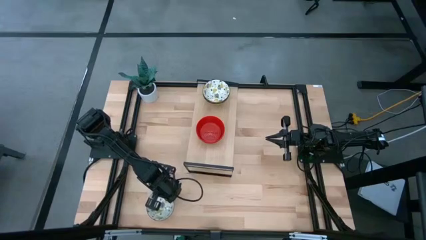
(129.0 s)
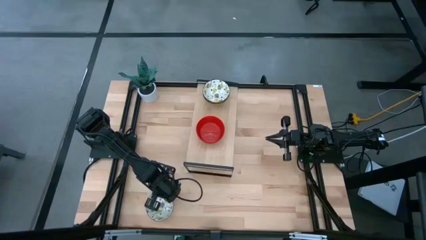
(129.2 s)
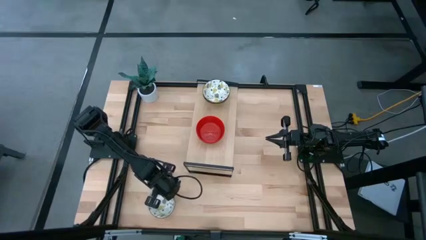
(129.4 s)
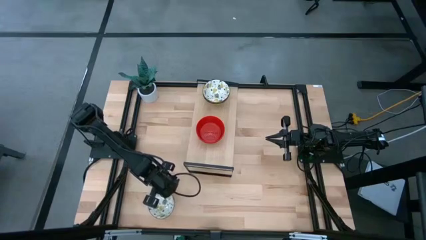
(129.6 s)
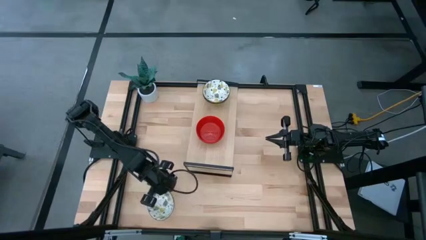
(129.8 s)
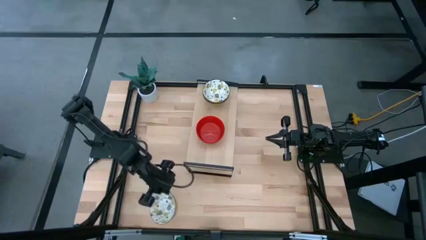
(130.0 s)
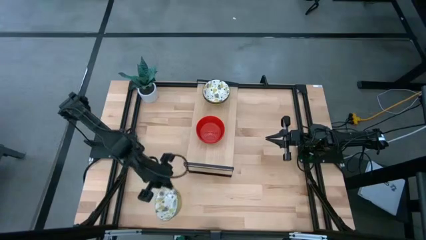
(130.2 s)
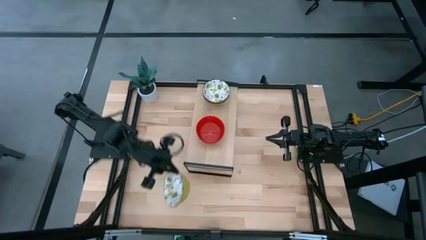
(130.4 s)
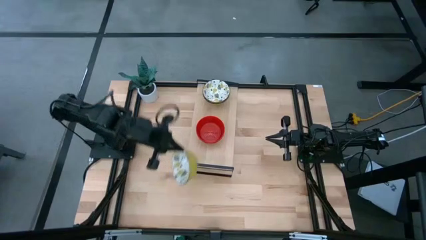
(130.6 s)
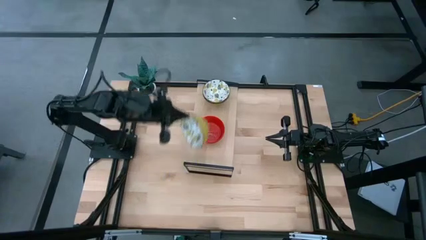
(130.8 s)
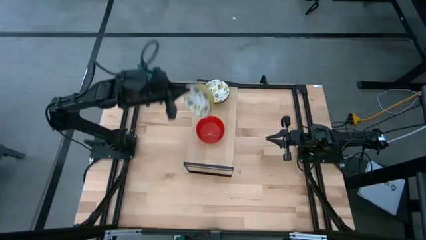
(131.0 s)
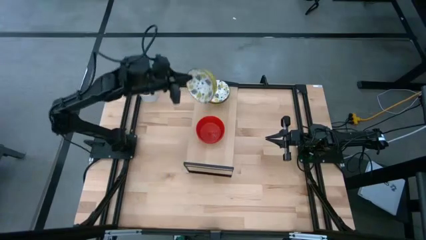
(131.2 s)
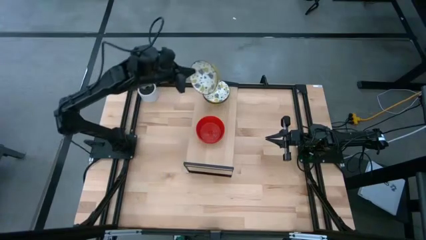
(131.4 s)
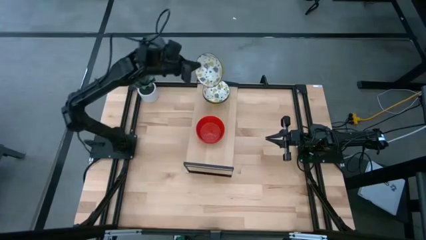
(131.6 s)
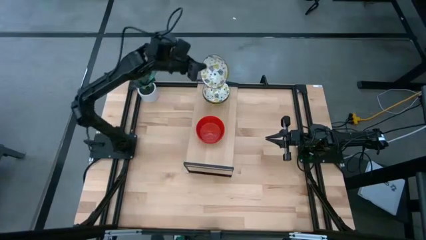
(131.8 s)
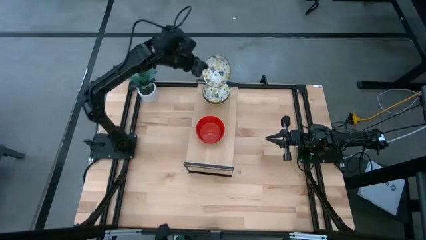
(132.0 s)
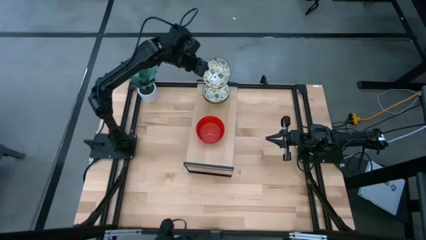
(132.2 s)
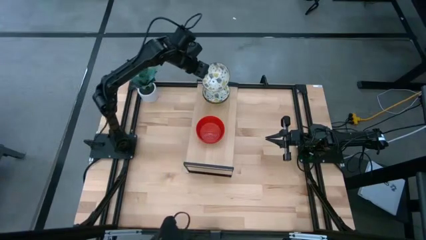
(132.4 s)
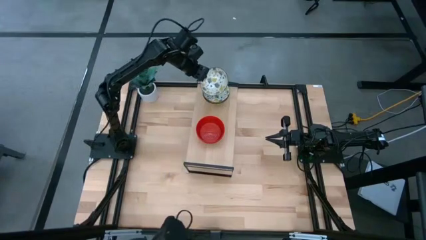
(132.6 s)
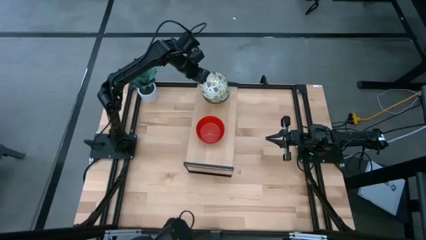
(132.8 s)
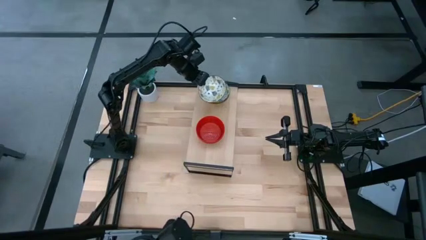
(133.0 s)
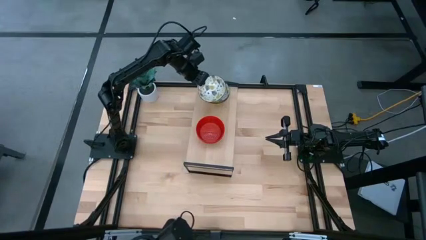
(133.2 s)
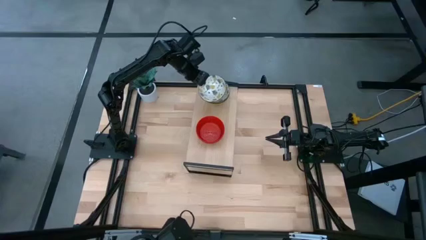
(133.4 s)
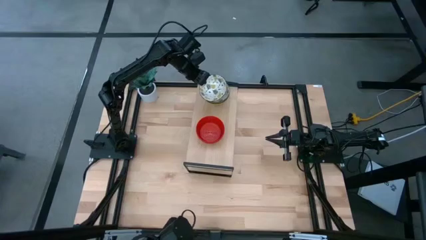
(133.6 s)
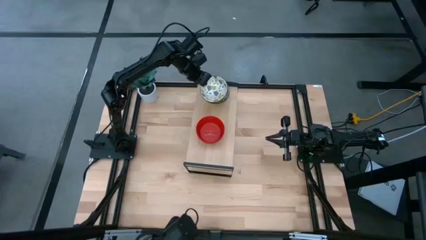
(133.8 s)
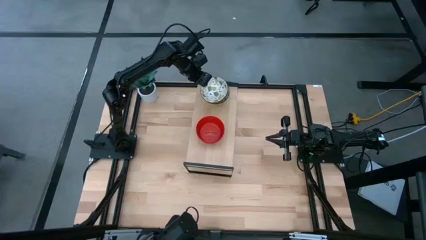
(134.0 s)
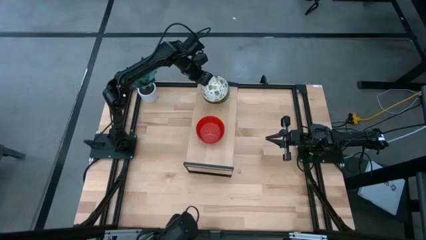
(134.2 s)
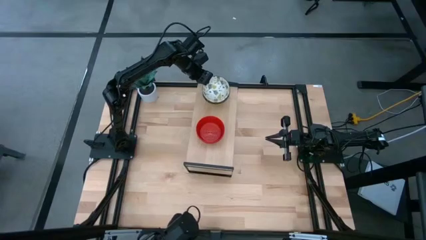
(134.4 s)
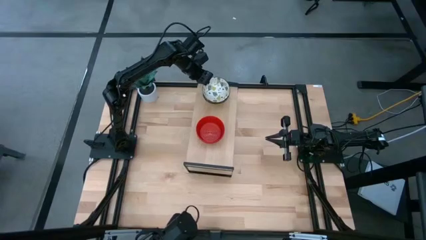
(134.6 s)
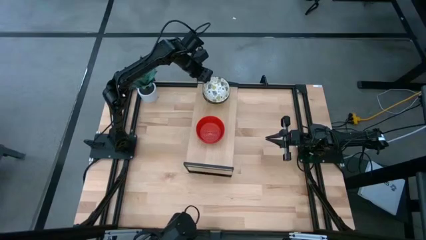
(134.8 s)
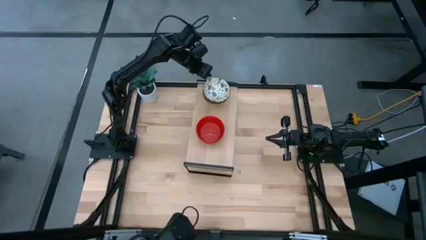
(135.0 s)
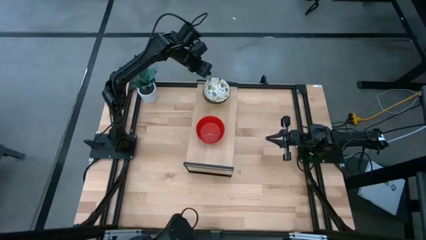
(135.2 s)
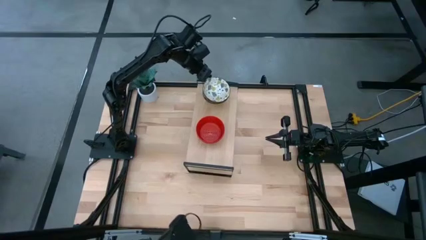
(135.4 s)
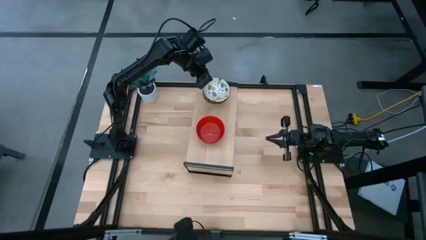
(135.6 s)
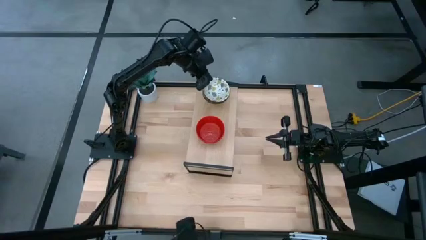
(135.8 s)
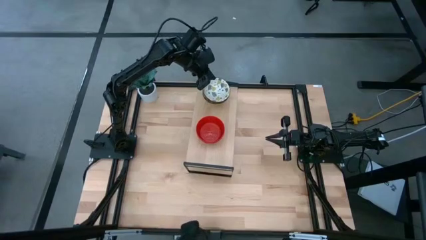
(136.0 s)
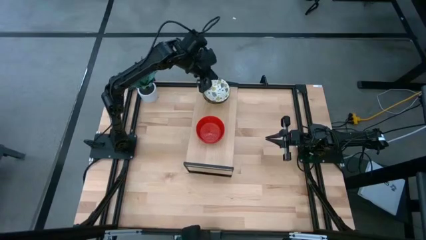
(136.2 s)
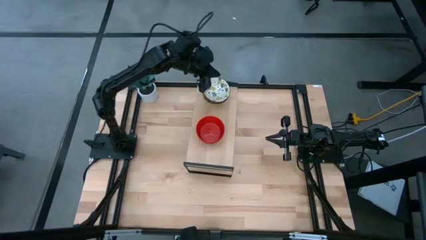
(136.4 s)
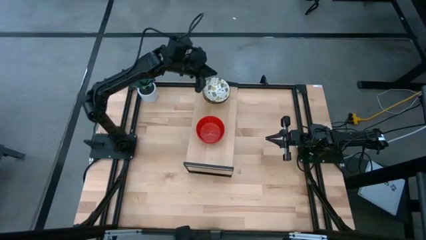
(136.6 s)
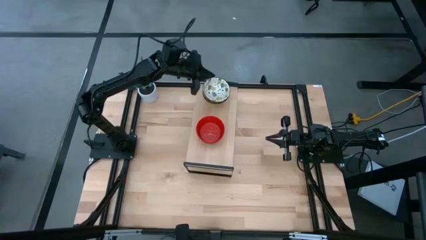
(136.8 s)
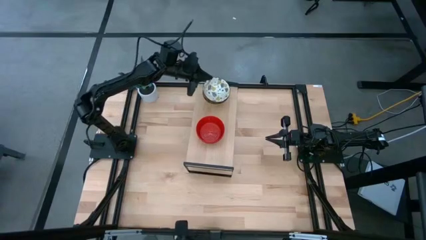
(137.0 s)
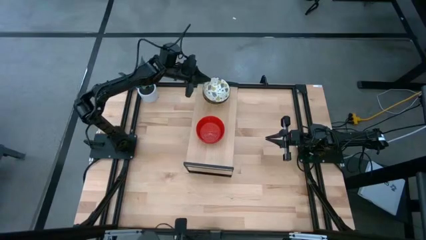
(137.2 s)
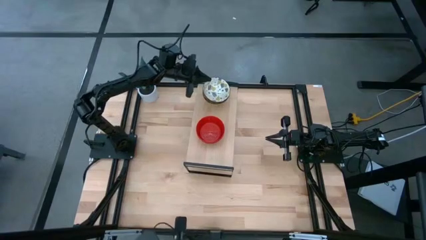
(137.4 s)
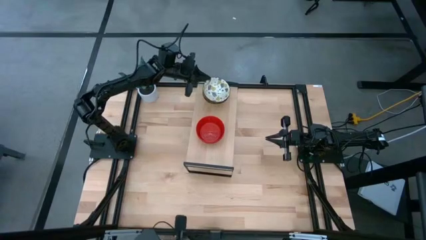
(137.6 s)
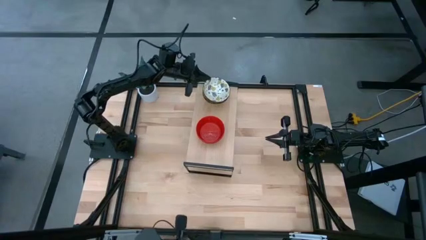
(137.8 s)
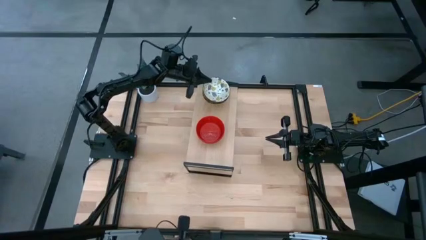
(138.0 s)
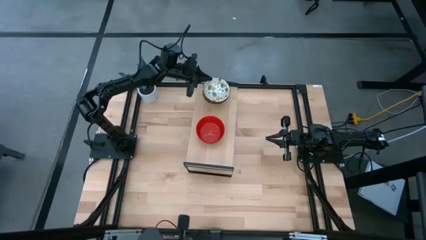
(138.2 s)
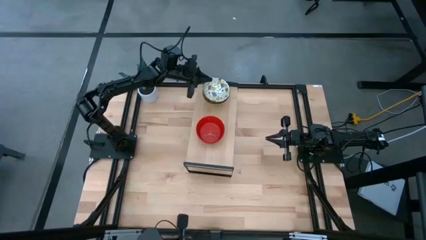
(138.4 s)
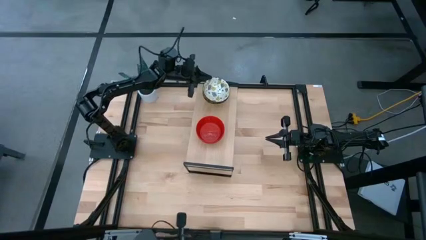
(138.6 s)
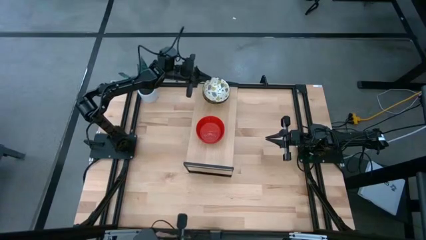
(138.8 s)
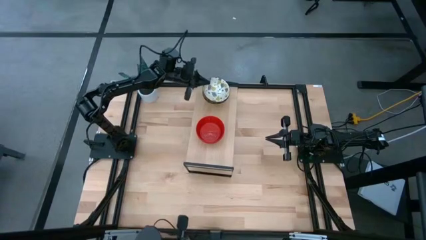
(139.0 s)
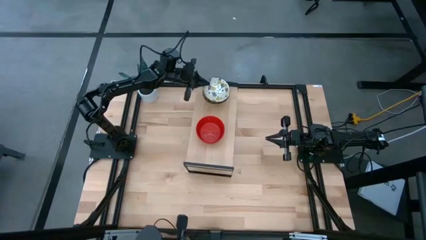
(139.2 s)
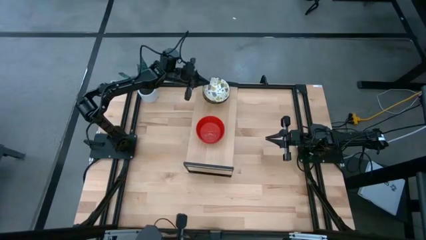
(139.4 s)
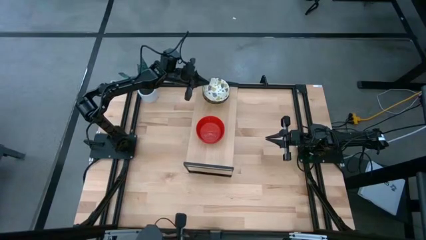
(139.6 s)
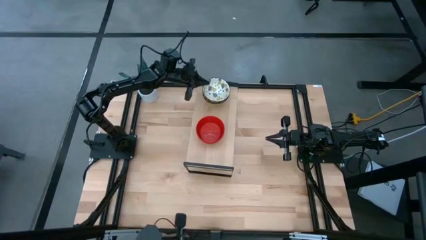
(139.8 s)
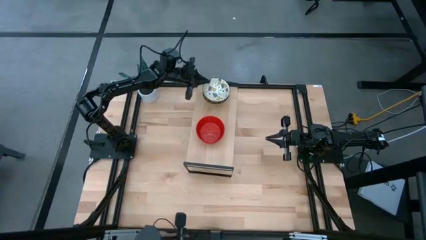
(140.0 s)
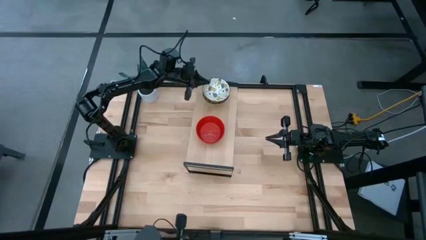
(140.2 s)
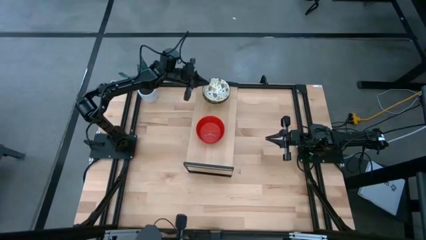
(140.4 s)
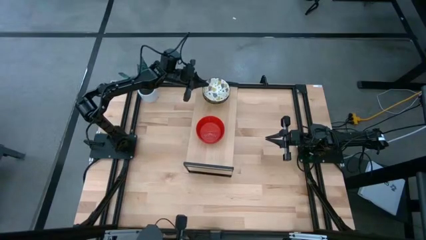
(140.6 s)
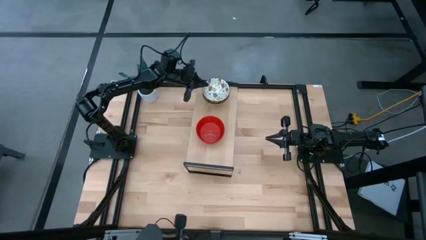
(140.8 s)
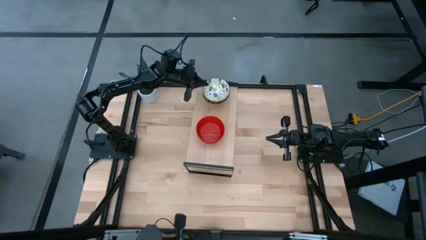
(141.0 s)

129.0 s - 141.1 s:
Task: Pick & Place Mini bowls
Stack the white patterned bowl on top of the white patterned bowl on the shelf

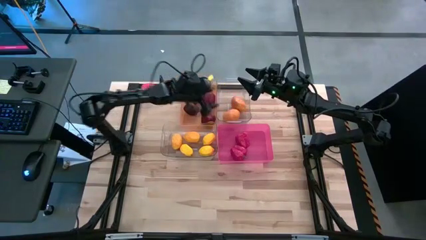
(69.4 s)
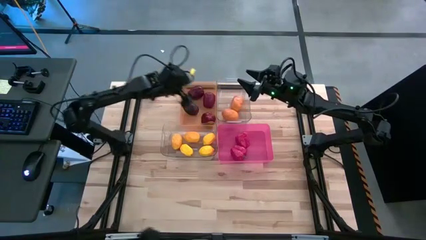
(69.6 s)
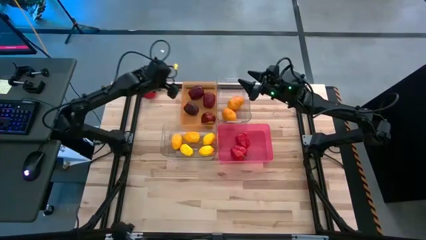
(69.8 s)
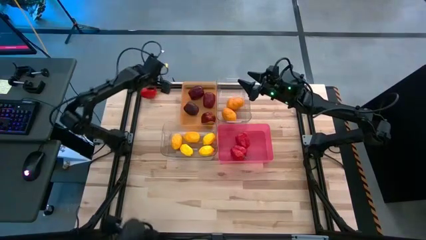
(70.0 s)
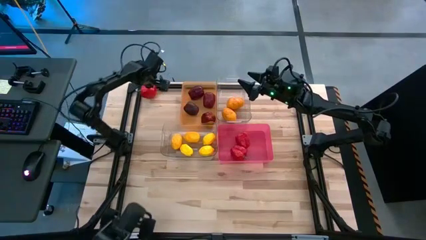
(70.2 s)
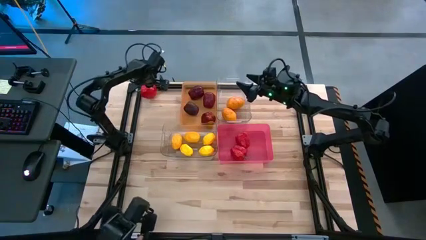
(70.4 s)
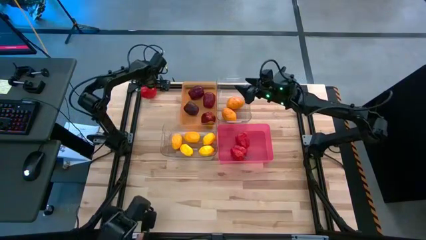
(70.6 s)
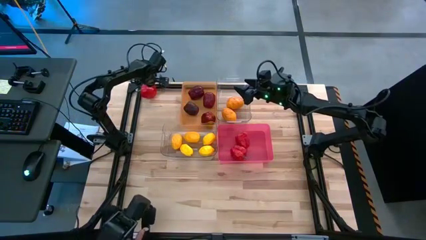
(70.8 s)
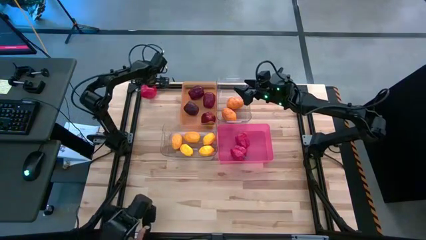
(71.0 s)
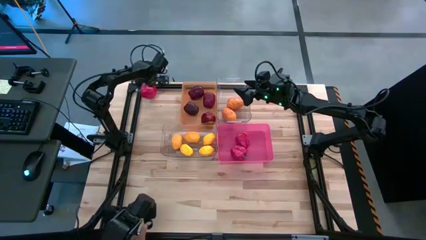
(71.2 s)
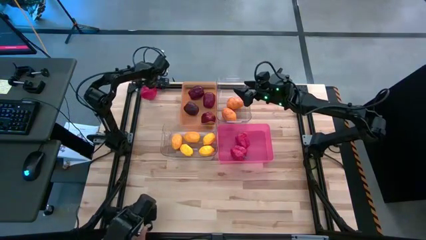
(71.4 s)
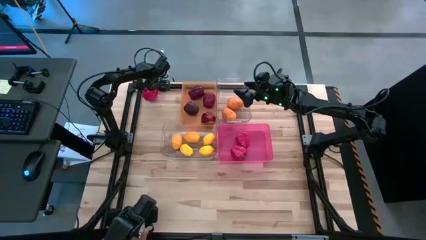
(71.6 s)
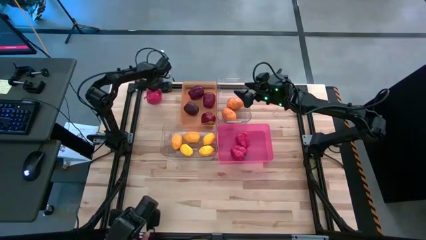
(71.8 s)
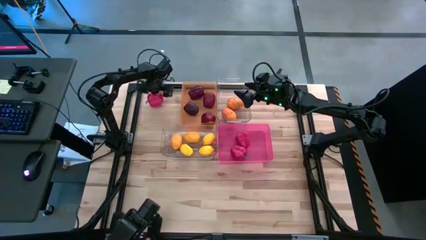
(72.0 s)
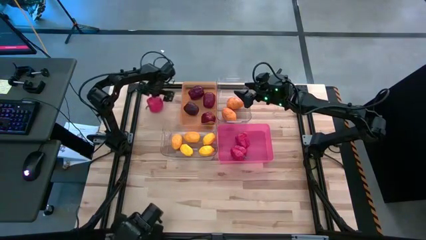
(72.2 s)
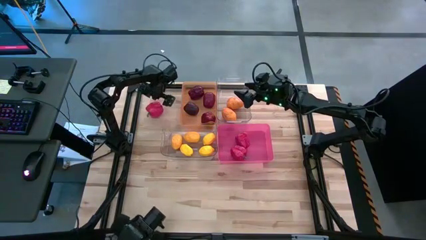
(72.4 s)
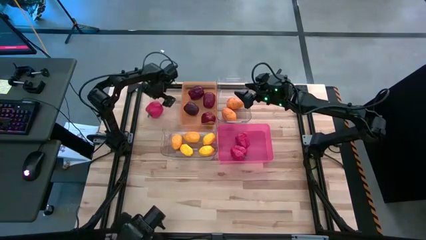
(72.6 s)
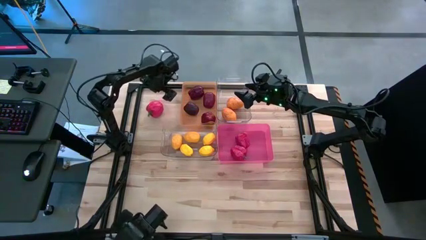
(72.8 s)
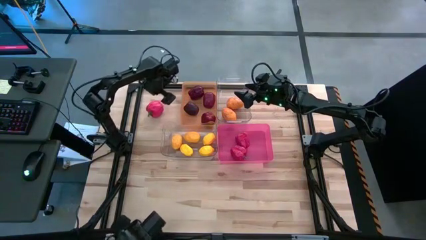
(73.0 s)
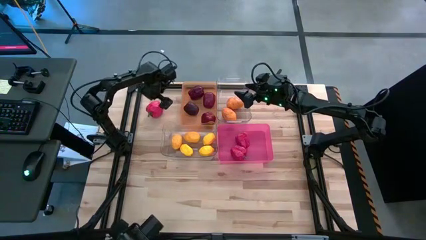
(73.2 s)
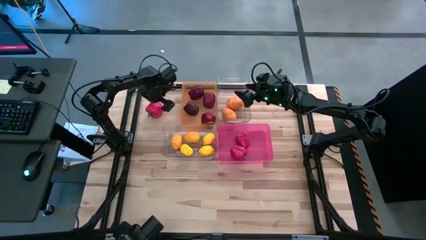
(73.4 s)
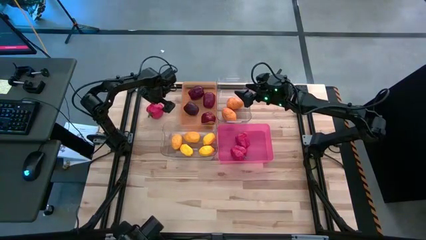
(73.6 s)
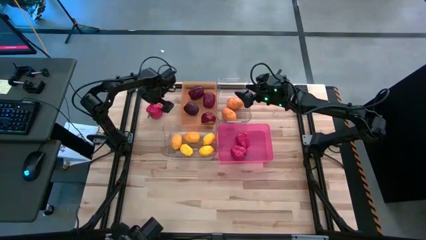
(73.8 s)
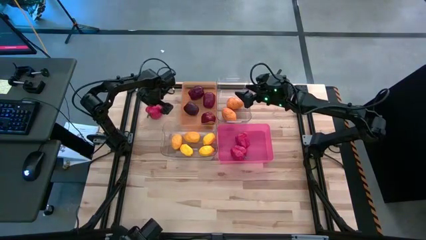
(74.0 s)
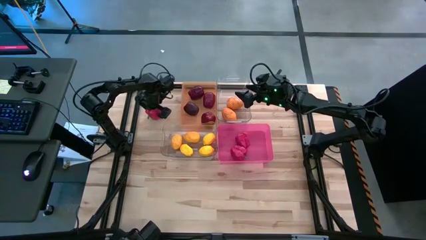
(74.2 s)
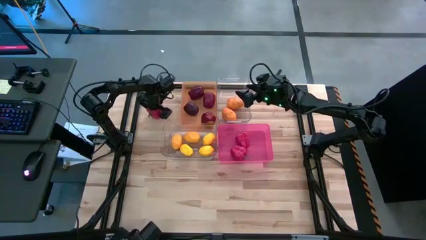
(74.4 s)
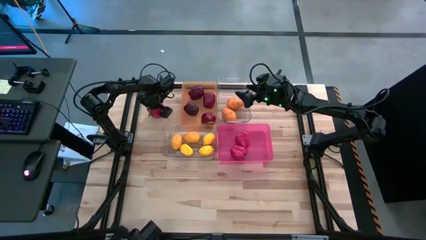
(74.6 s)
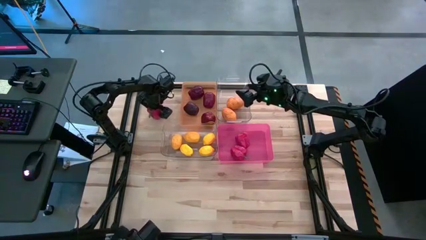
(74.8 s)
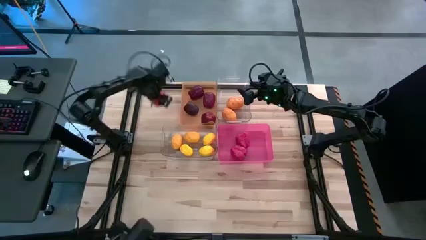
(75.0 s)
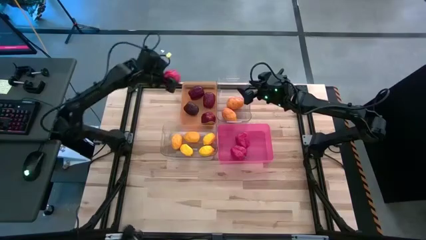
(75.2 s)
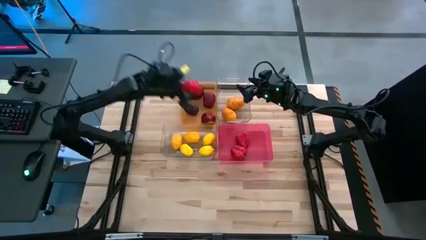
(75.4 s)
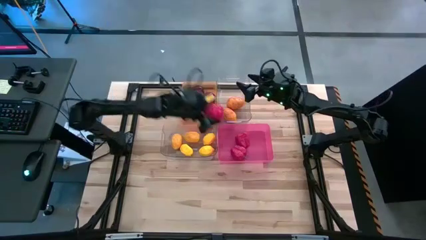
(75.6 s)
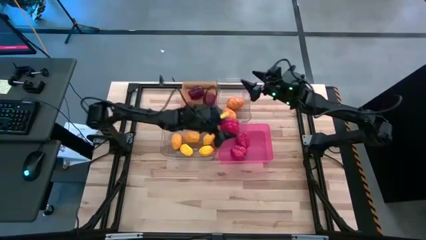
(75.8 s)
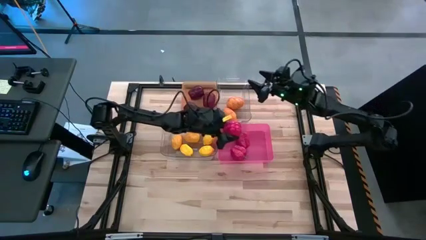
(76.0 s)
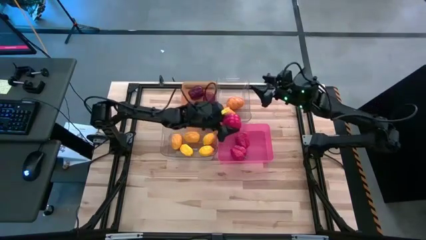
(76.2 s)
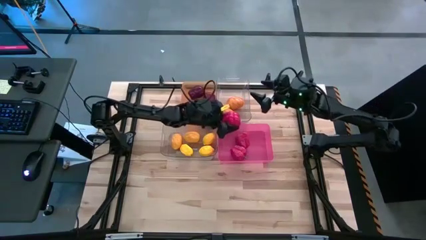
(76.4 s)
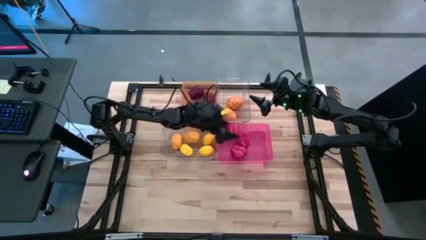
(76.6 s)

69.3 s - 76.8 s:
Task: Sort produce into baskets
Put the red bell pepper into the red bin
